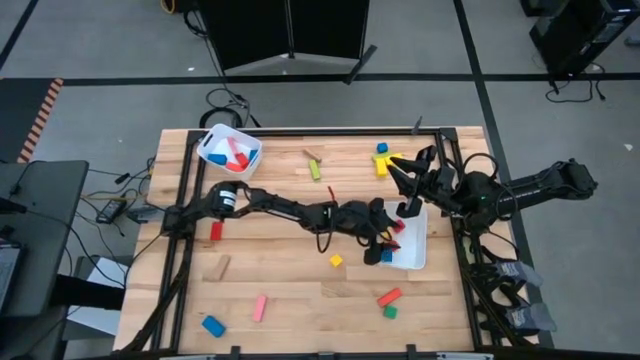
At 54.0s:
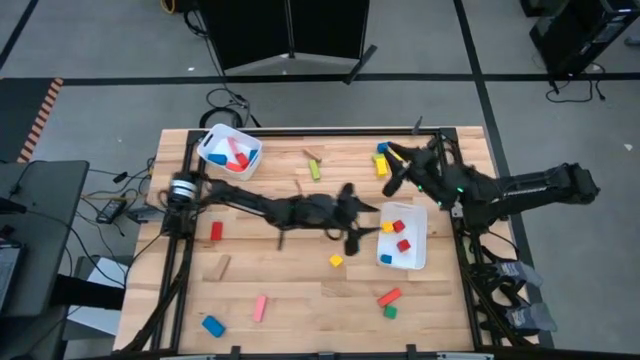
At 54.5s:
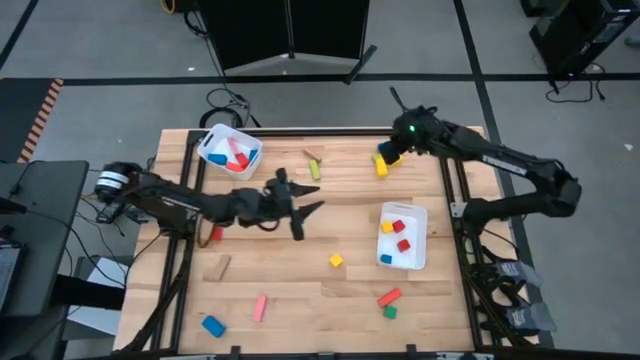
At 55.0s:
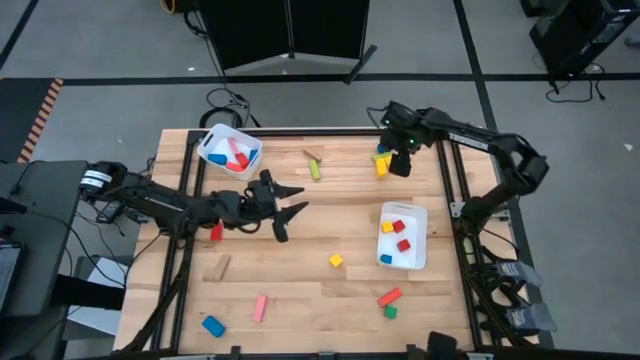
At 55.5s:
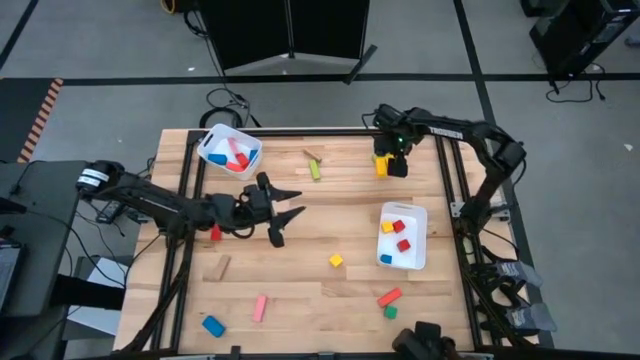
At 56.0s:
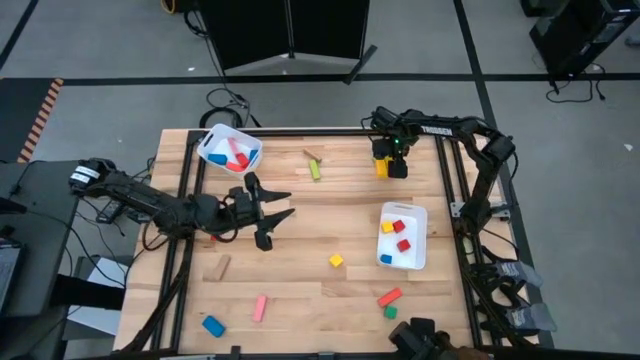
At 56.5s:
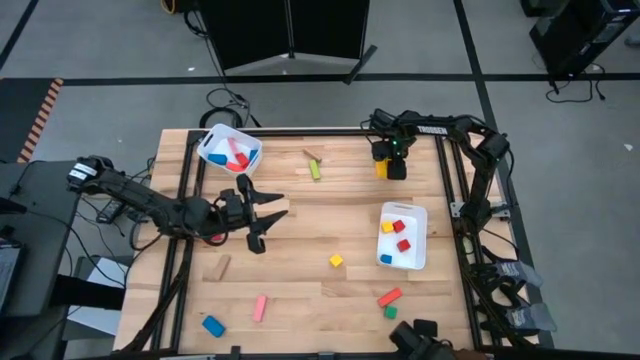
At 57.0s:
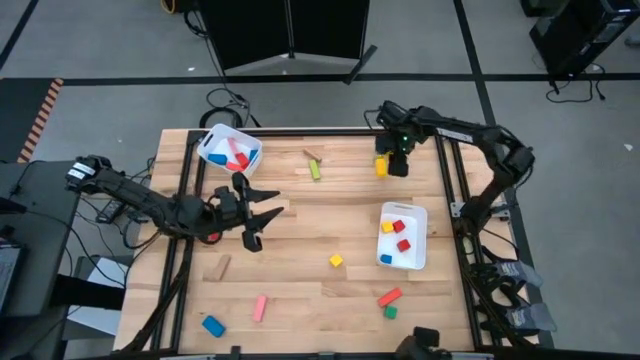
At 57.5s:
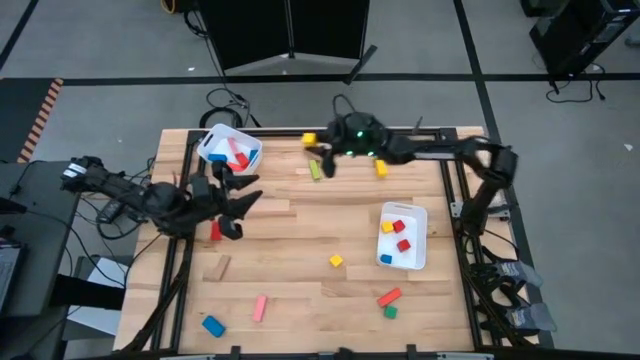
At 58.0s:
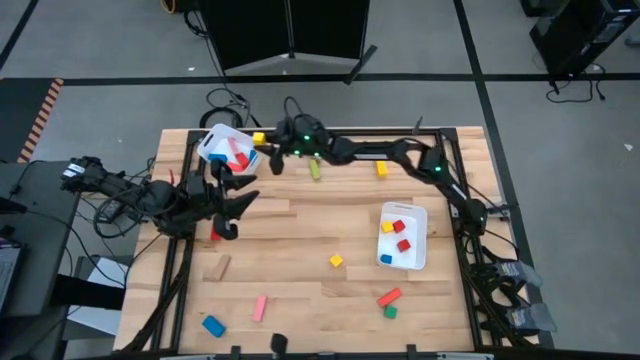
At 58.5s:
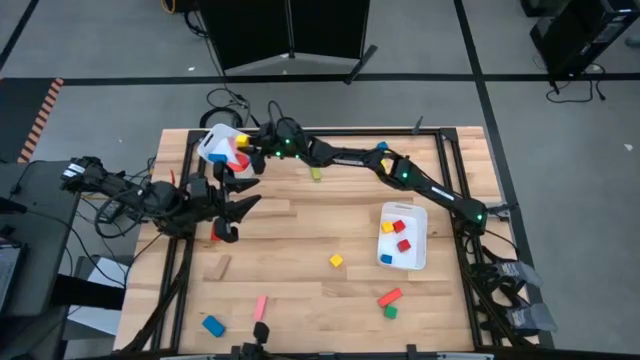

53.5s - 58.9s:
Task: Sort blocks by size
Put the right yellow rectangular block into the top white bin

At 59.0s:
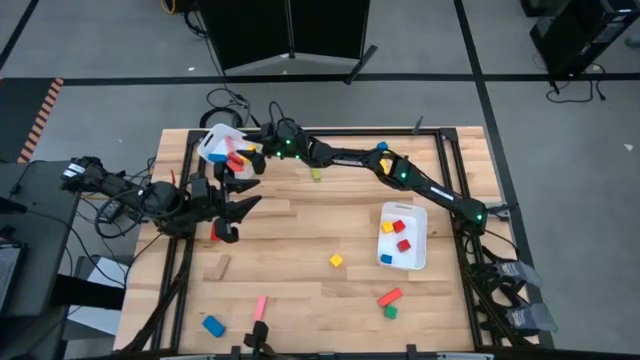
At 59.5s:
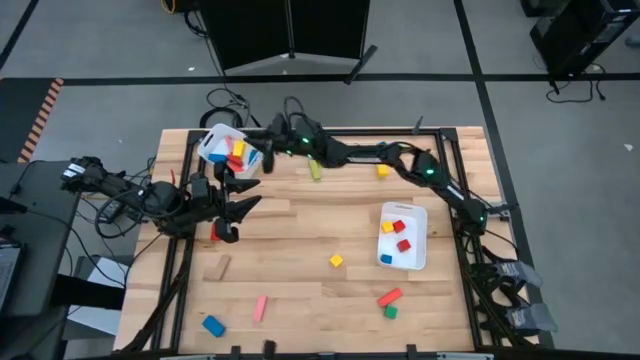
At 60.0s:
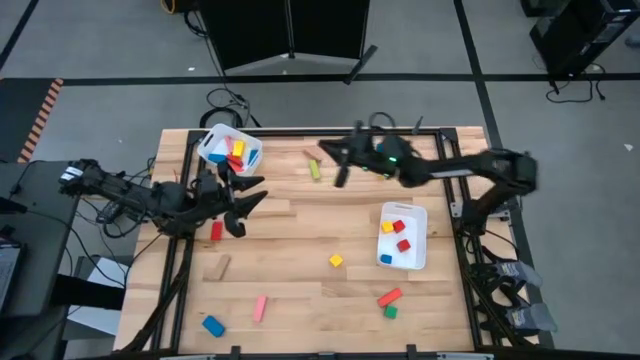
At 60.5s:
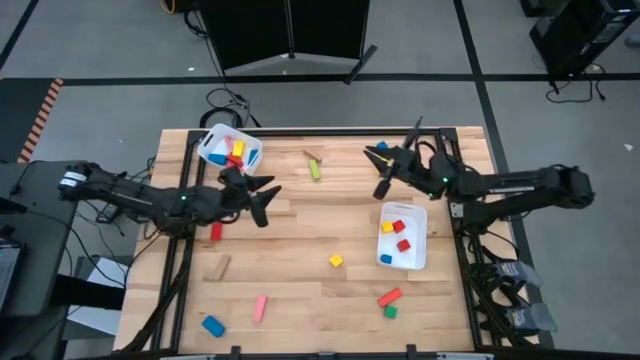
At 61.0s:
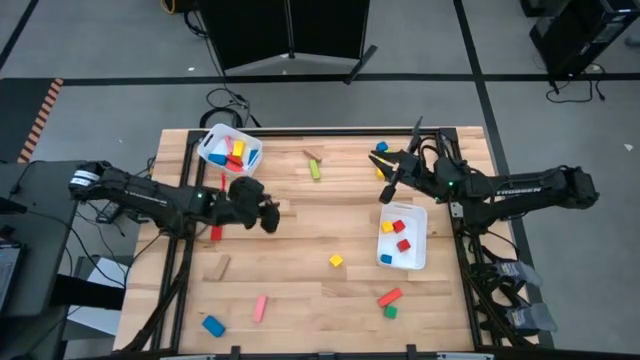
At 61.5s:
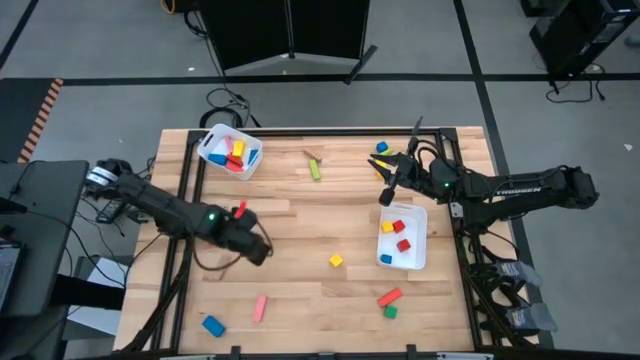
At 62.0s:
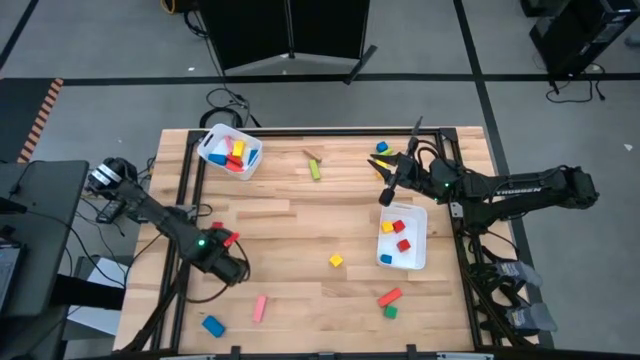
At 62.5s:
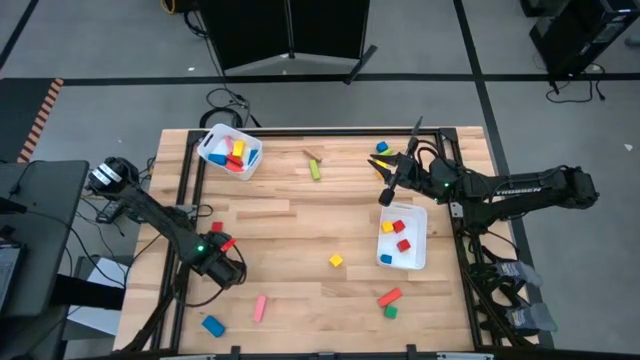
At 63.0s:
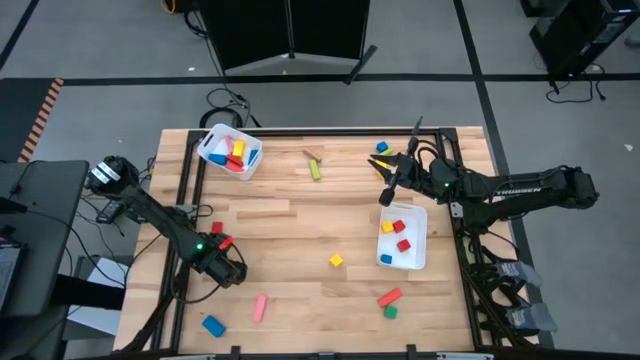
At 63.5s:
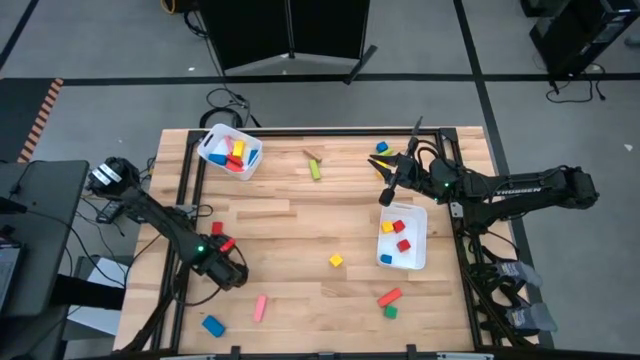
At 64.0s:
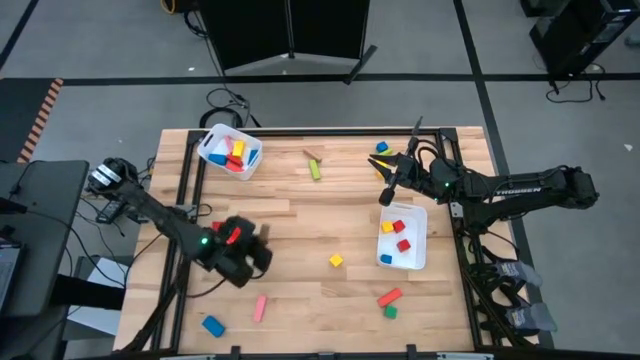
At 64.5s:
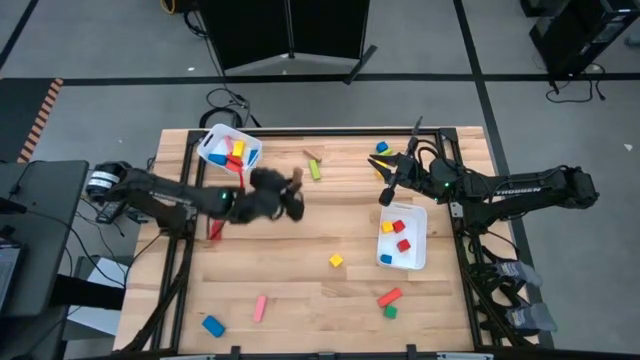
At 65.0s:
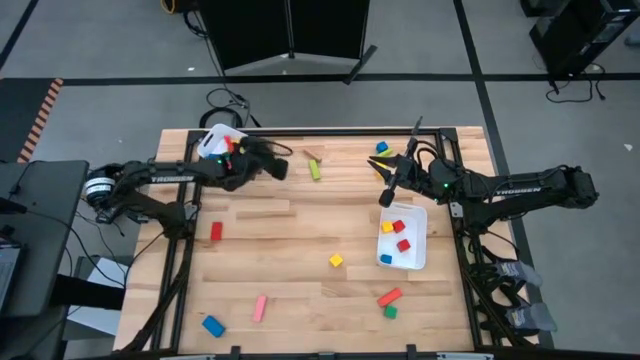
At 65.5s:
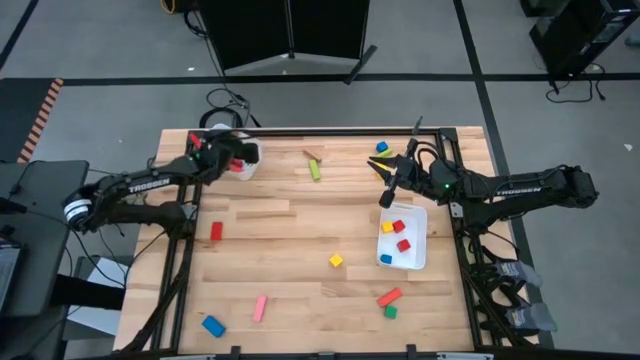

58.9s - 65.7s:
Put the bottom brown rectangular block into the top white bin

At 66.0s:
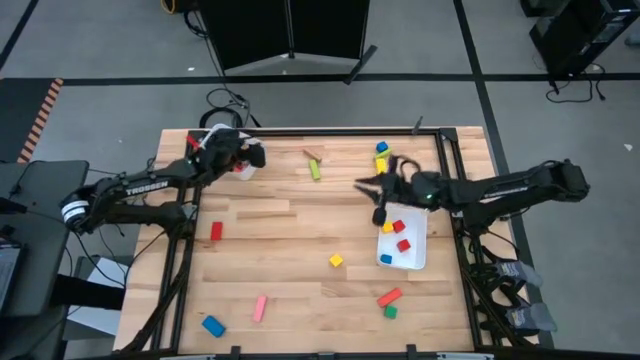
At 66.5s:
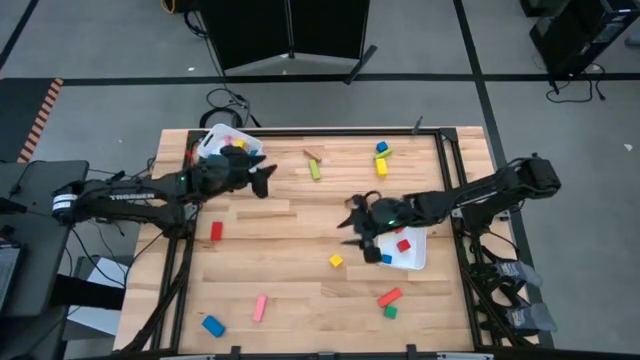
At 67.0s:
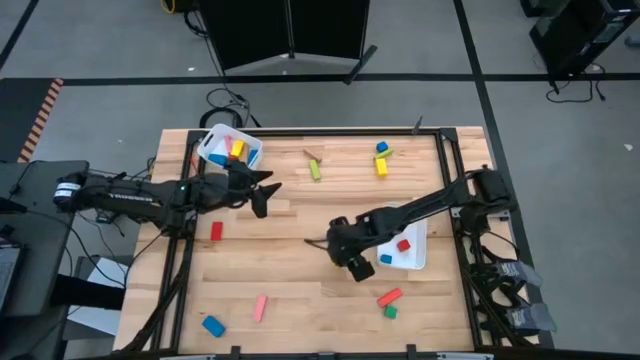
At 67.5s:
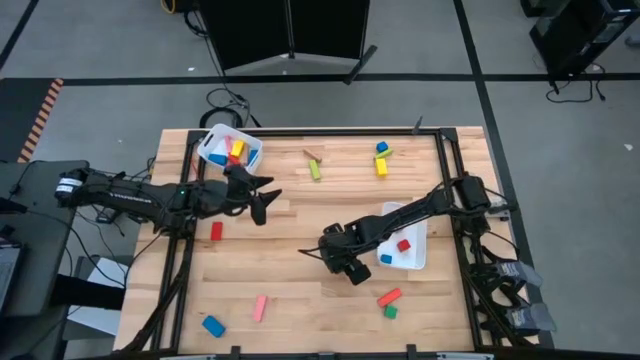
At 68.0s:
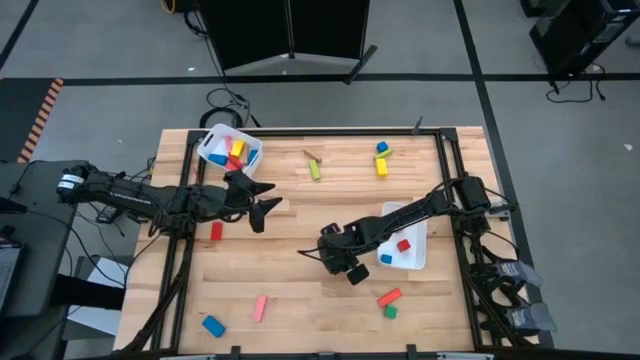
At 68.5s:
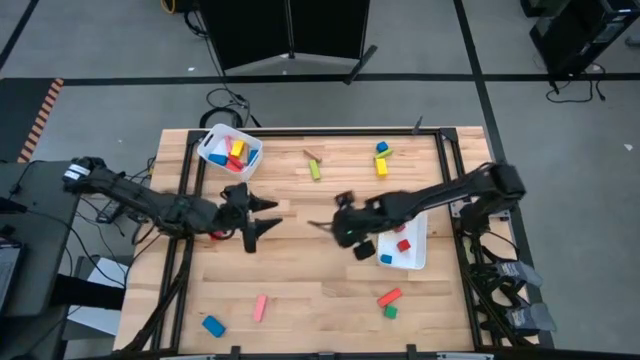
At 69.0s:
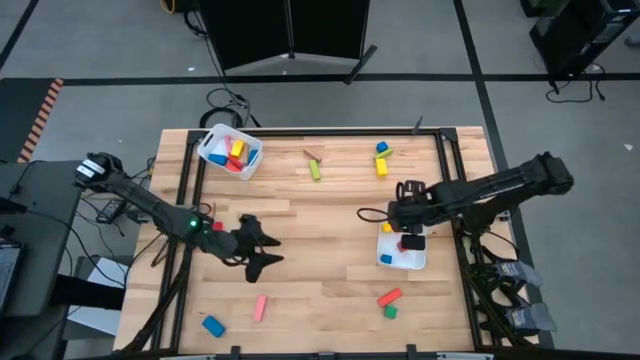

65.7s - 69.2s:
Put the yellow cube block into the bottom white bin

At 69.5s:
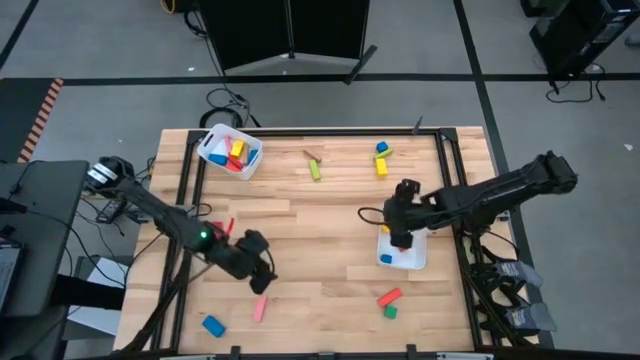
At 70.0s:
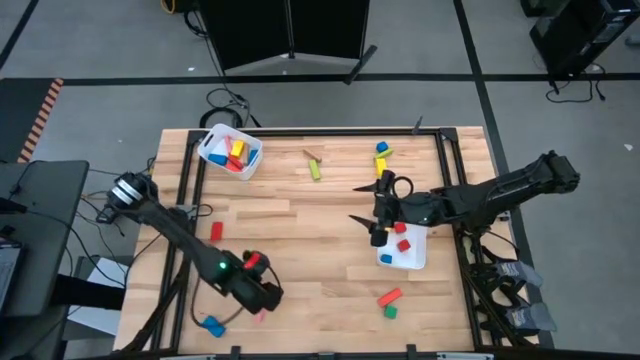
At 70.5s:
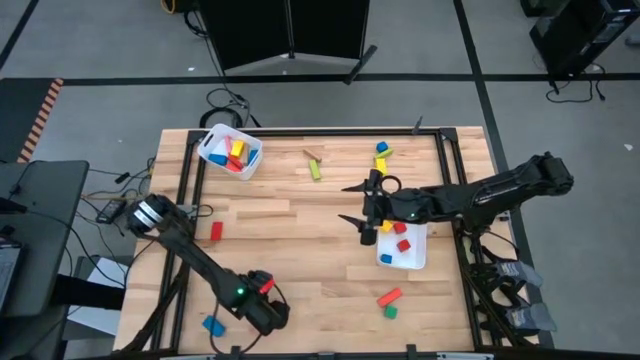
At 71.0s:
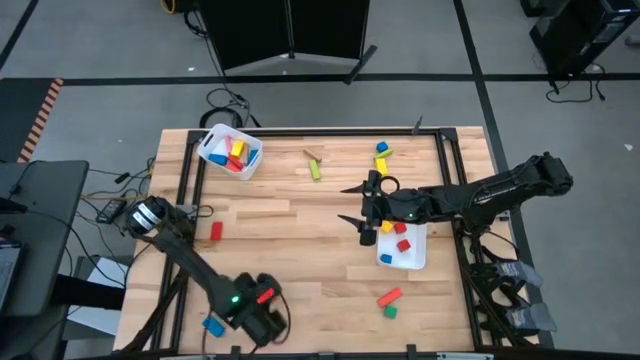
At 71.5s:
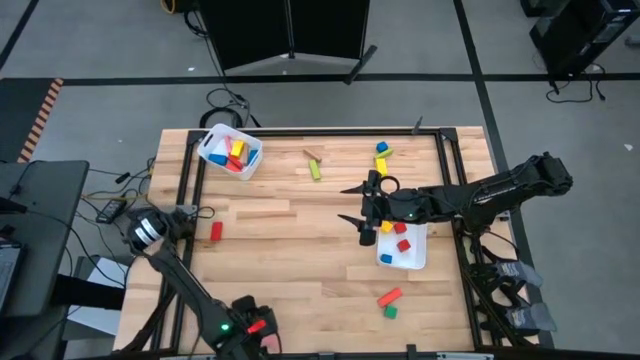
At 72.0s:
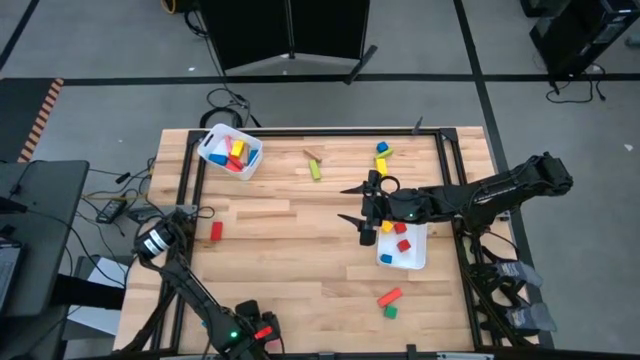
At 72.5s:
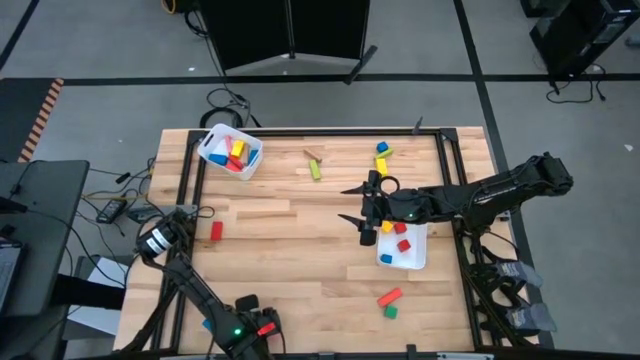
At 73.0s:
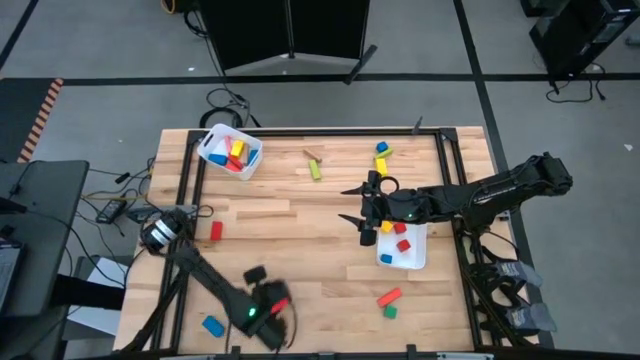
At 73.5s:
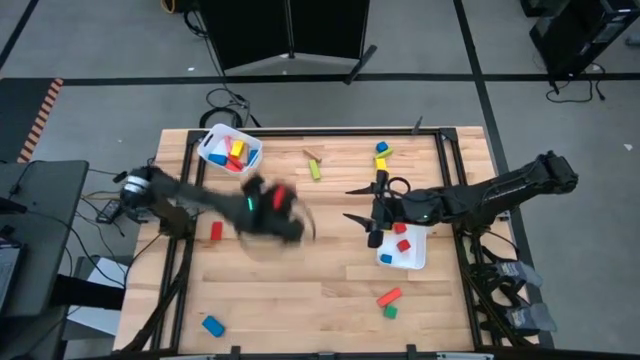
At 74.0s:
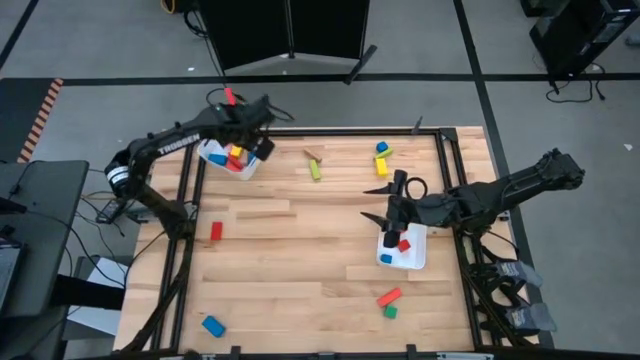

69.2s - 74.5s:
Put the pink rectangular block into the top white bin

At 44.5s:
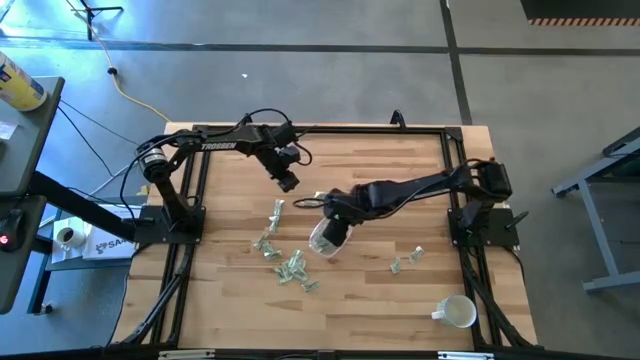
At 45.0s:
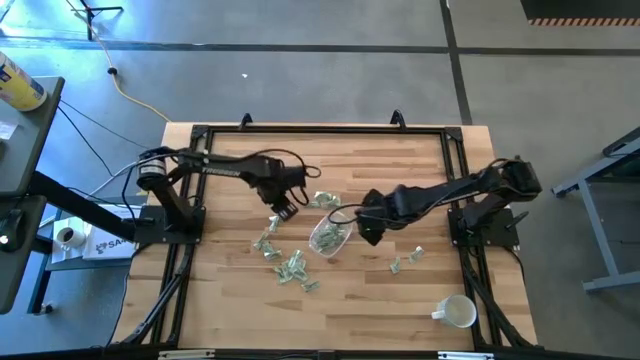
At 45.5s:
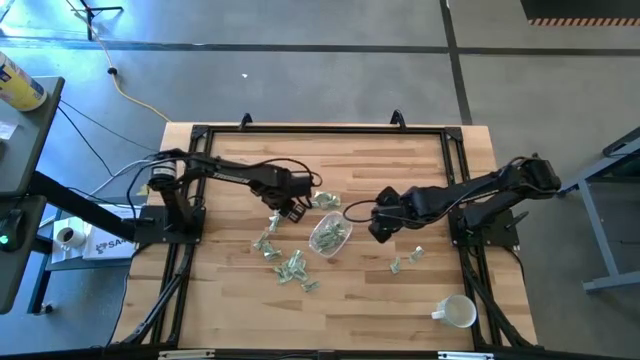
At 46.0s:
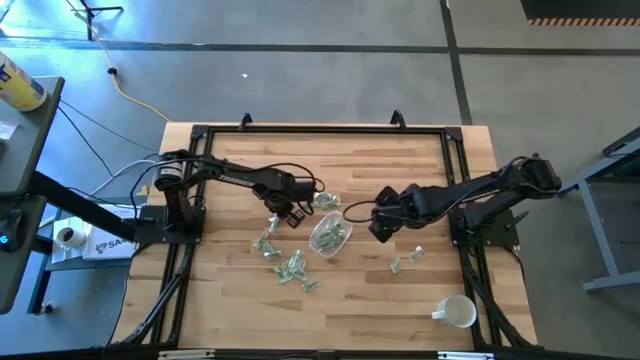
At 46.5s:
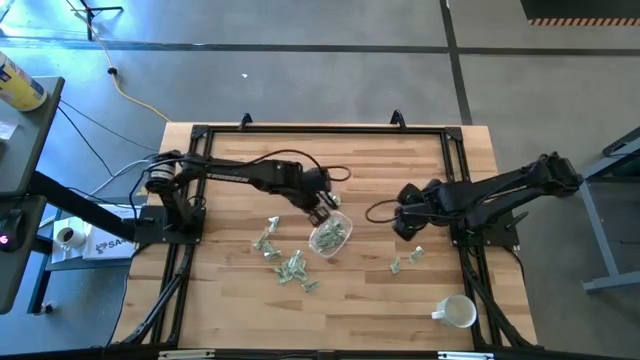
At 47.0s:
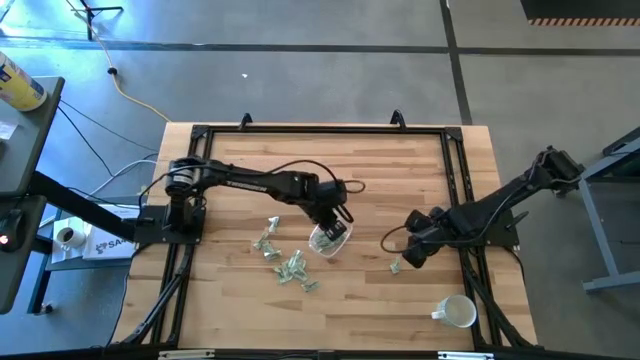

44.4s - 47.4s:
Task: Pick and place Stevia / Truvia into bins
Put the stevia packet into the transparent bin
